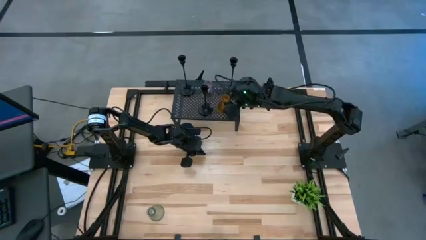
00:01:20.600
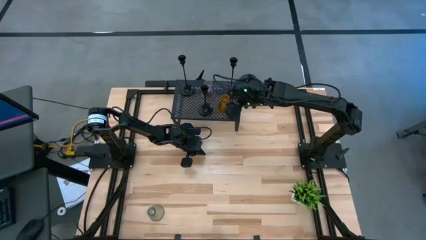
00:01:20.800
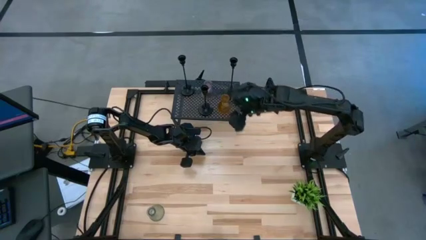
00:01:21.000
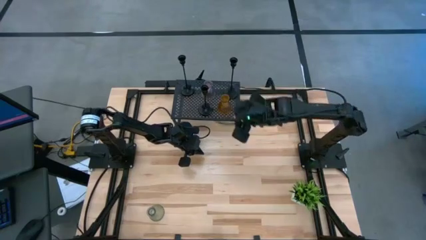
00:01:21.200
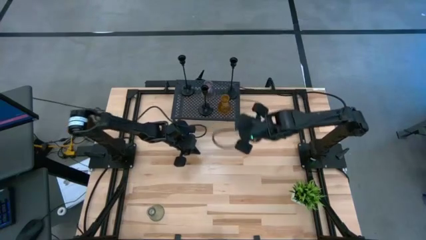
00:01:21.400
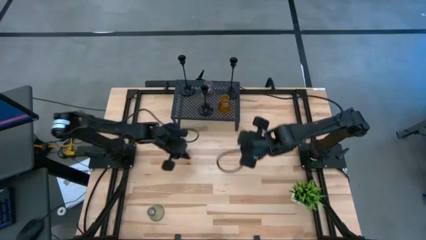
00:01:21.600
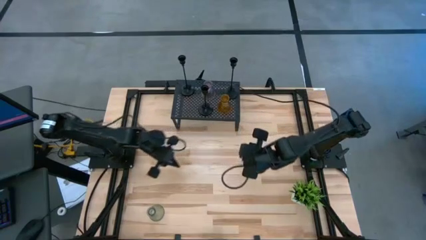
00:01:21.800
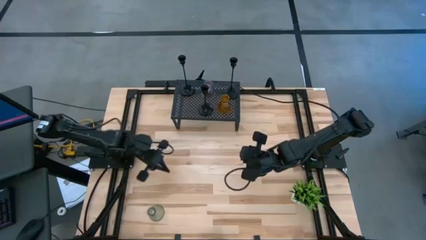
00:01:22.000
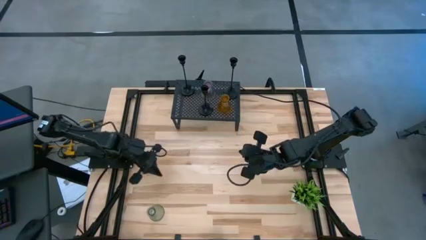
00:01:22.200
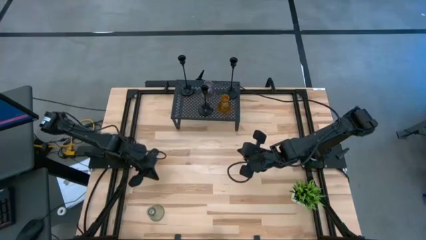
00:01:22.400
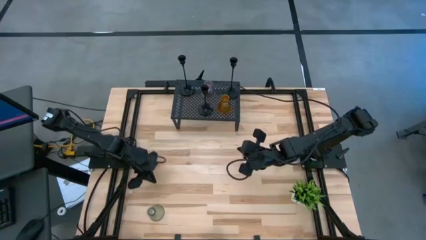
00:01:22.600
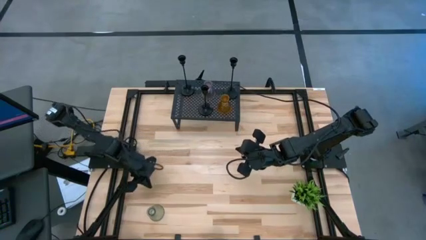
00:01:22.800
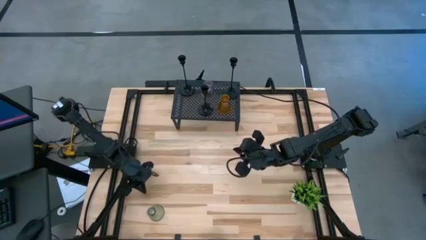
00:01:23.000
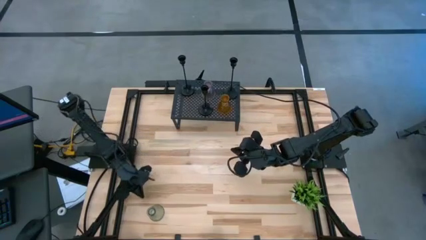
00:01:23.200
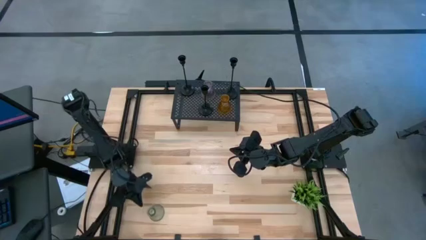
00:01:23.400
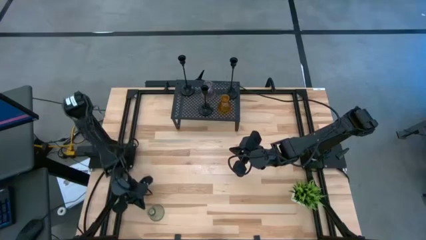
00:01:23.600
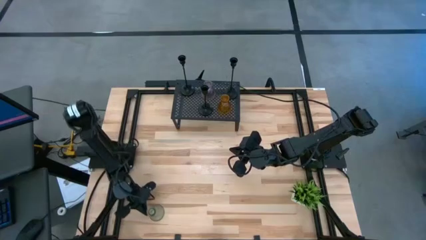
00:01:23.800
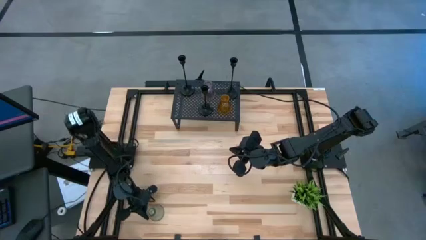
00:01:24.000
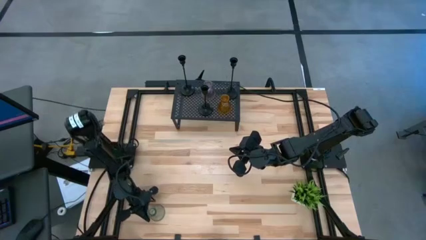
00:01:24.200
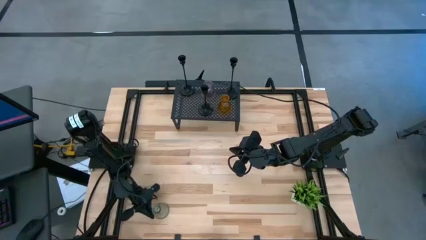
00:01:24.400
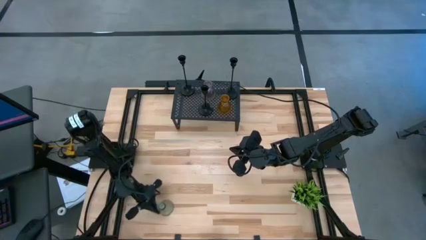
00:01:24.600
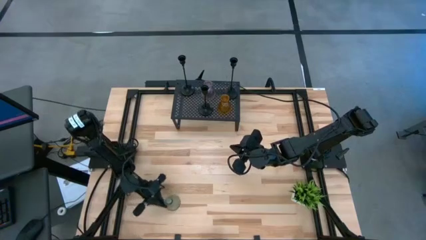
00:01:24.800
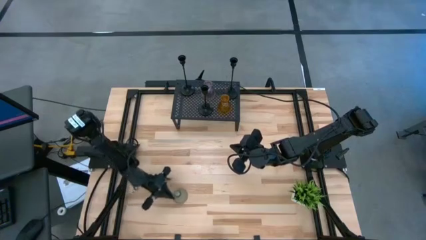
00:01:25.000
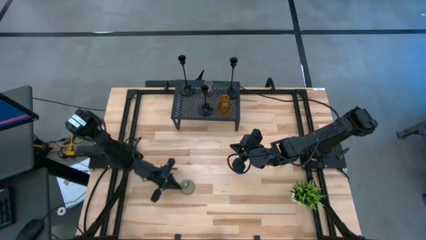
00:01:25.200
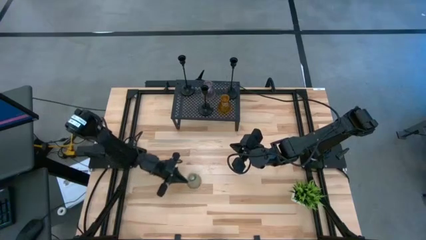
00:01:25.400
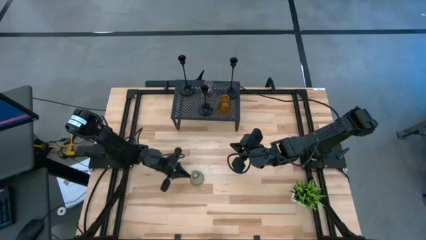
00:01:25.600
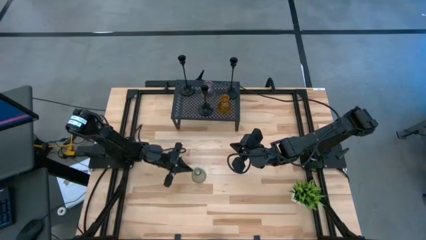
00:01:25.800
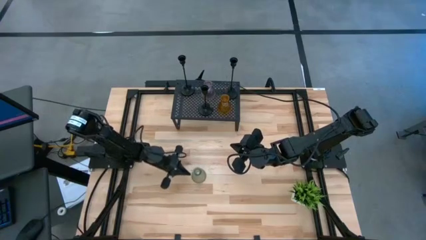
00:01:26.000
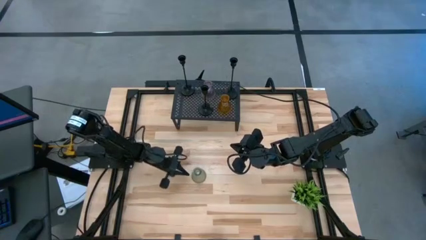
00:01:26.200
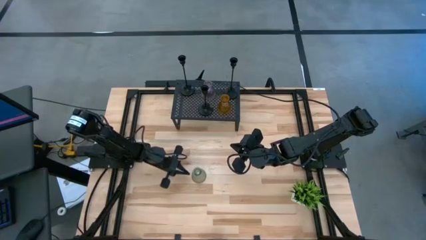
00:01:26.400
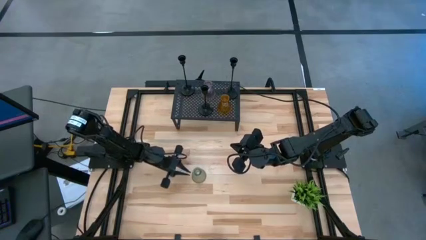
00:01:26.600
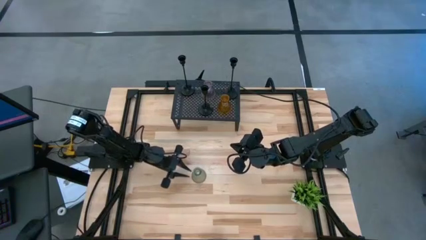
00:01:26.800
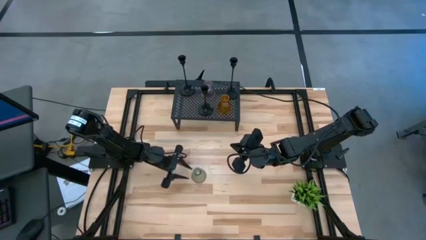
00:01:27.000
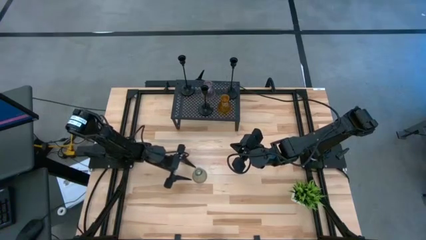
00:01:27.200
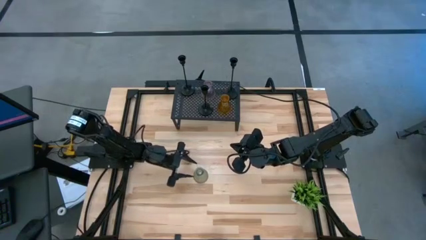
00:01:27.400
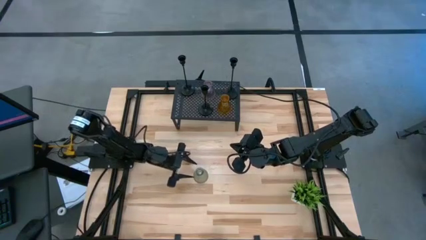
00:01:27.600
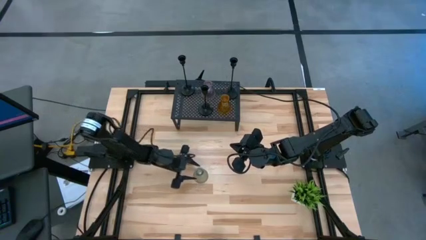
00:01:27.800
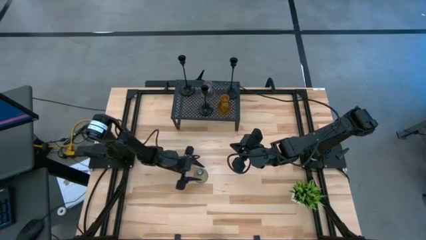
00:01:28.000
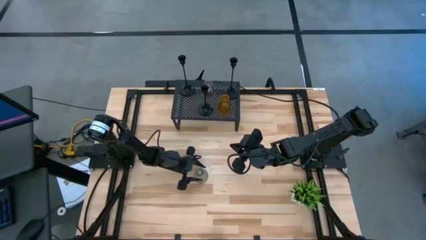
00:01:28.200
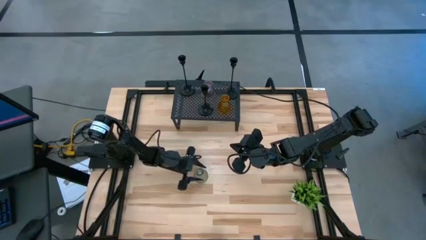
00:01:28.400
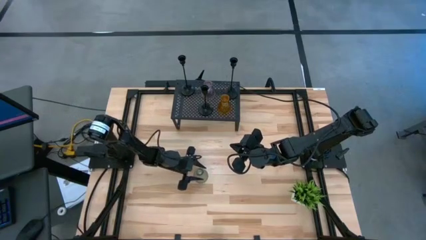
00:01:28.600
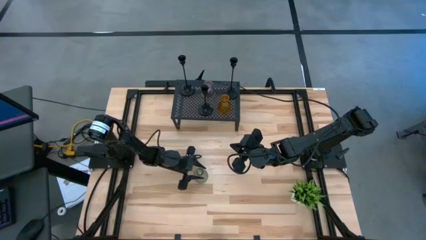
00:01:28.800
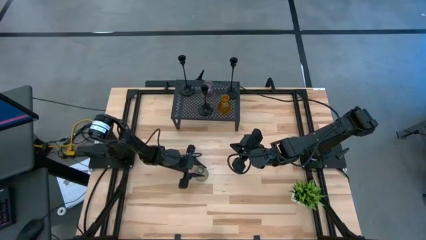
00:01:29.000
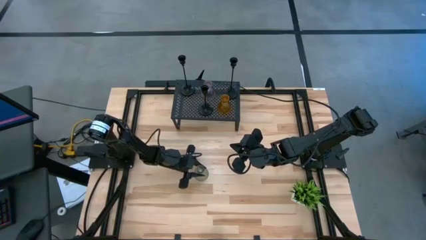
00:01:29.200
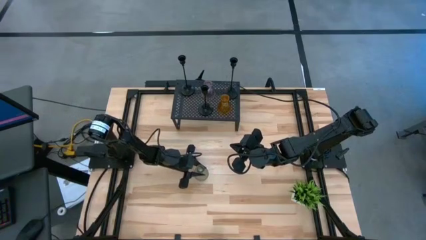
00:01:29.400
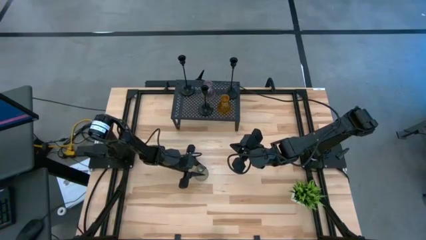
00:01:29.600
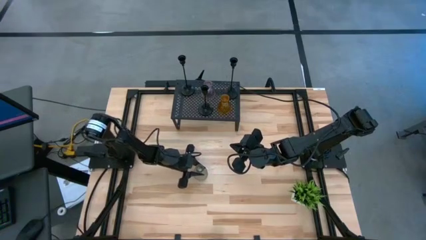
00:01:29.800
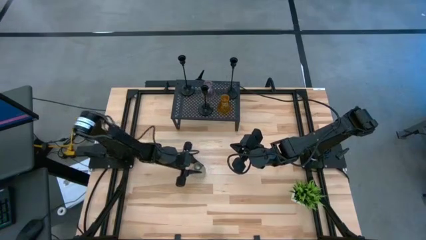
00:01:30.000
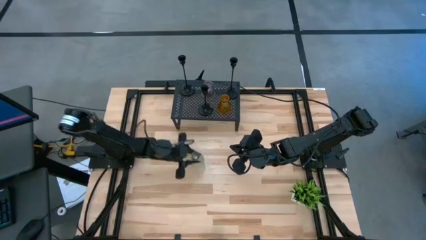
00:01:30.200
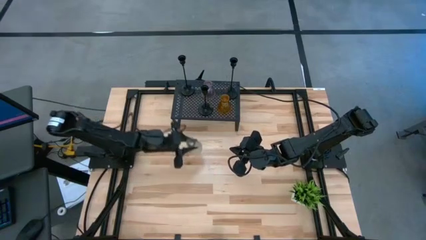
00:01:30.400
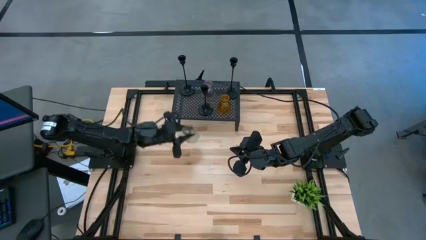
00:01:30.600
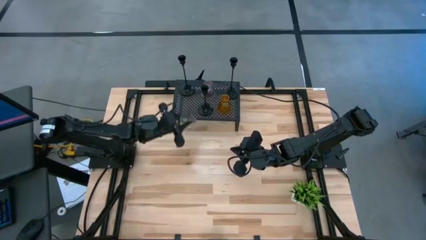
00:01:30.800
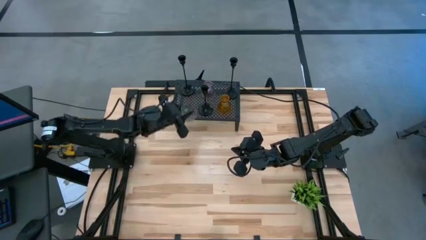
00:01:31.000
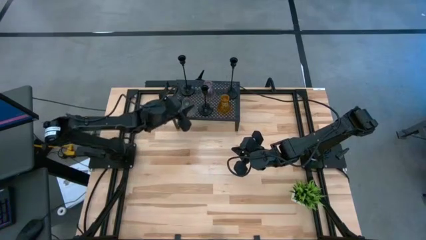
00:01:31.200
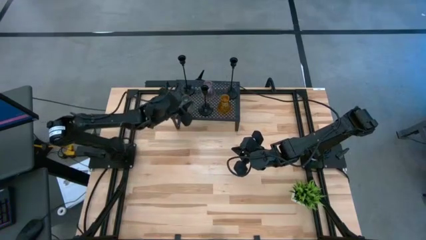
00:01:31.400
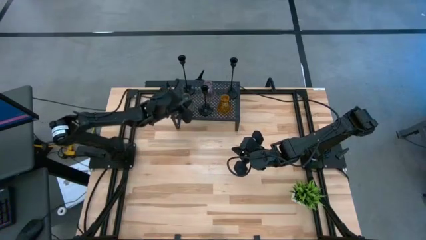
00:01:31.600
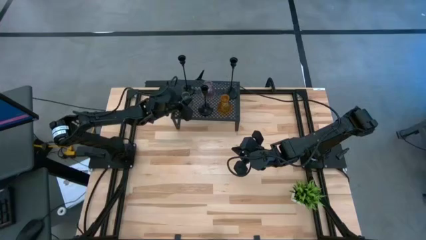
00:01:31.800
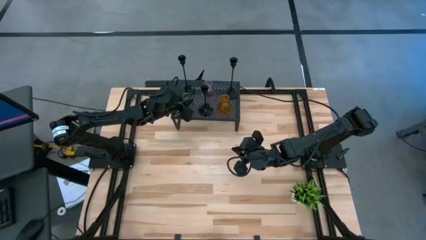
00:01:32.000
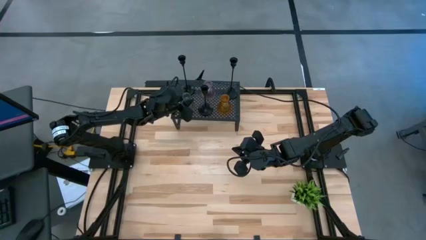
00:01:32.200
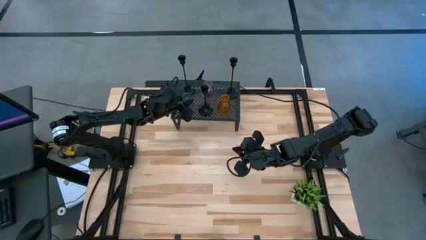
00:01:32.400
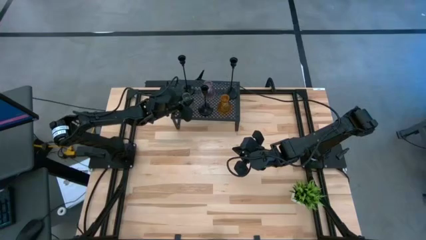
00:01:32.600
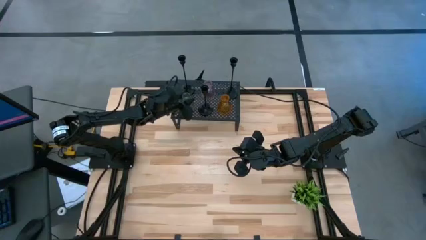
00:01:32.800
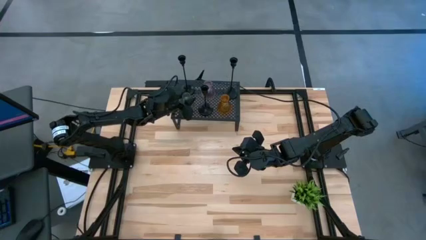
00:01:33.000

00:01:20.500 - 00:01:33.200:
Task: Pick & Place candle stick holders
Put the green glass candle holder on the shelf
